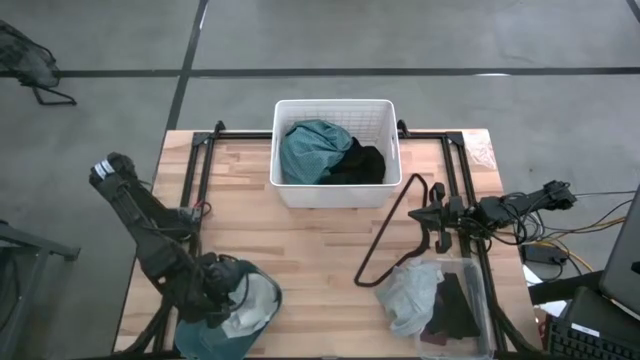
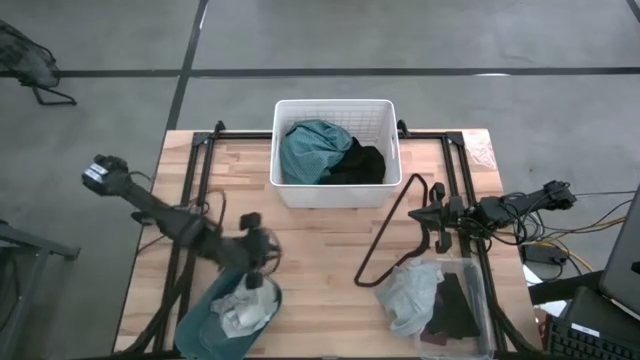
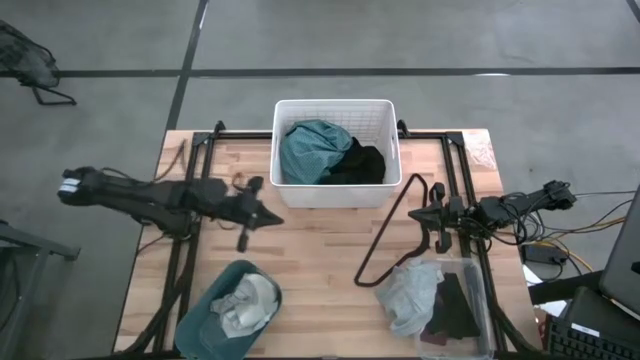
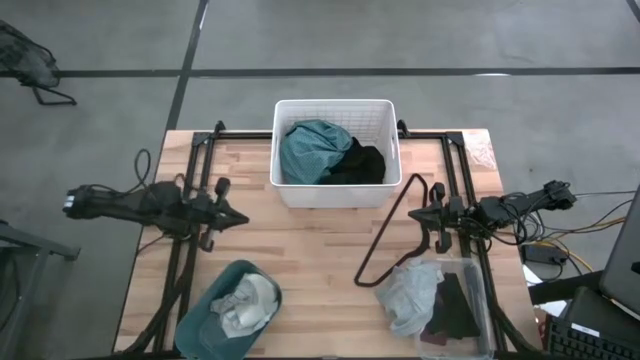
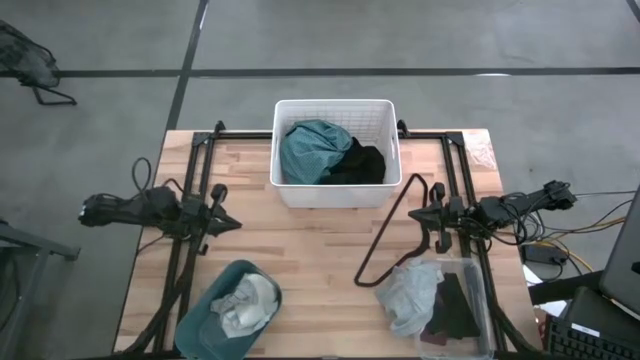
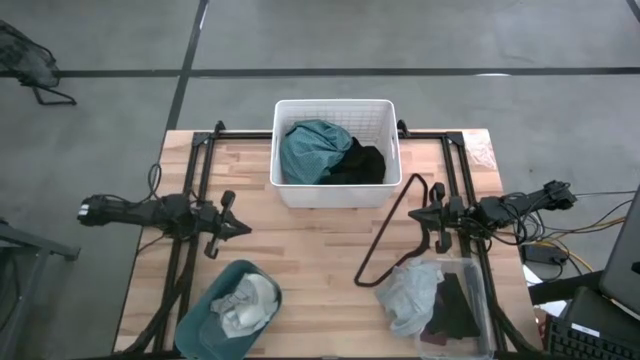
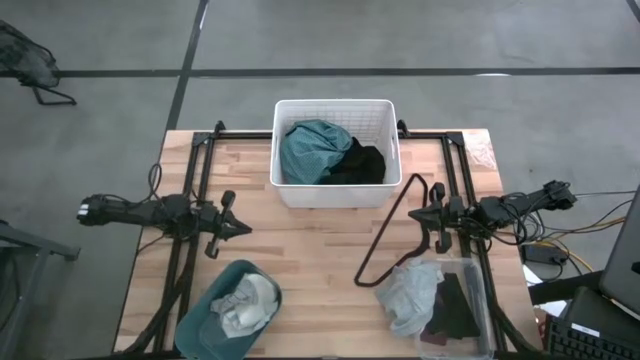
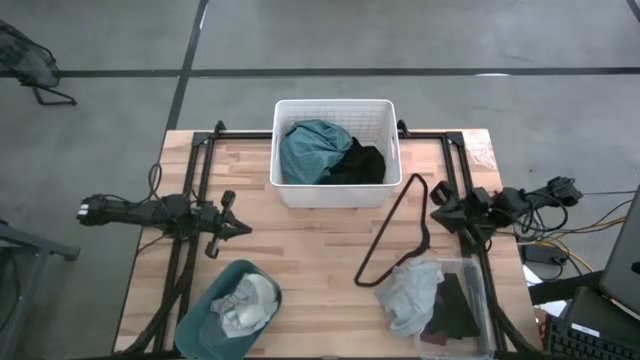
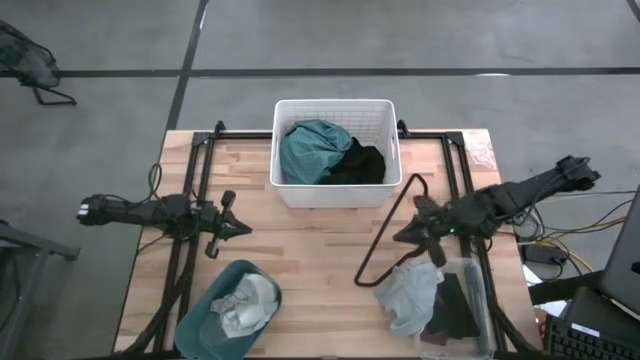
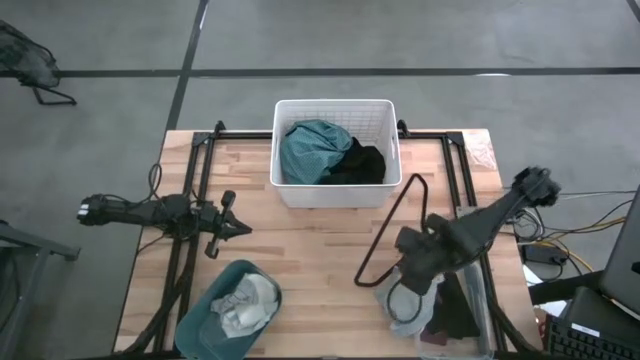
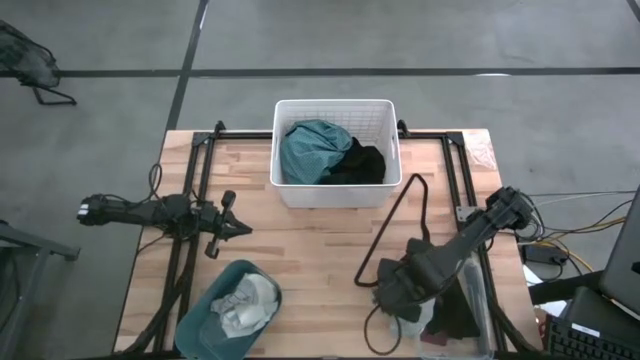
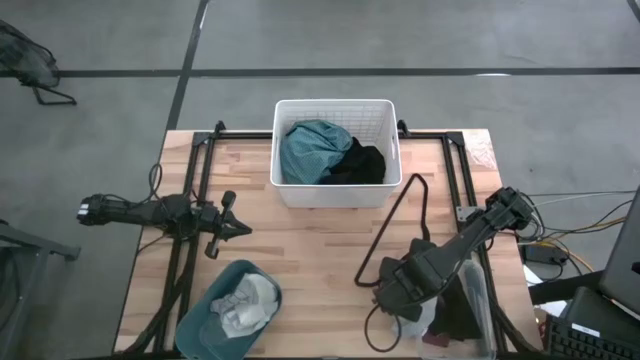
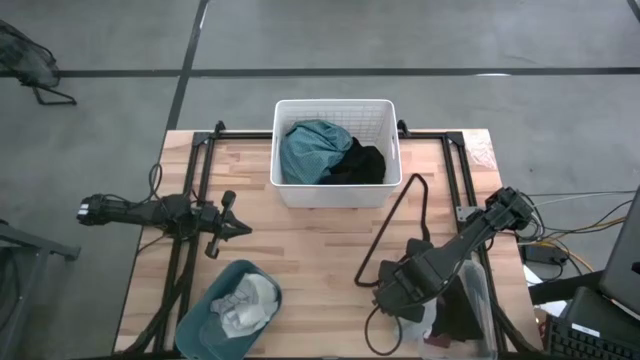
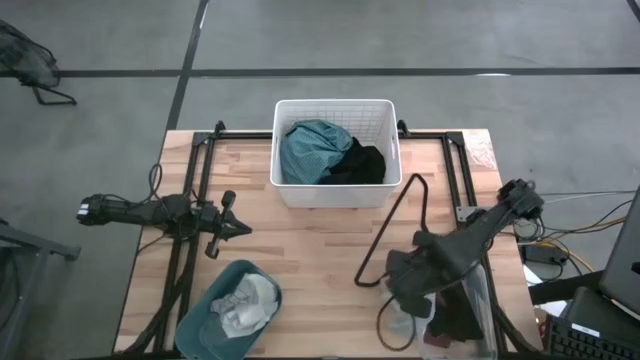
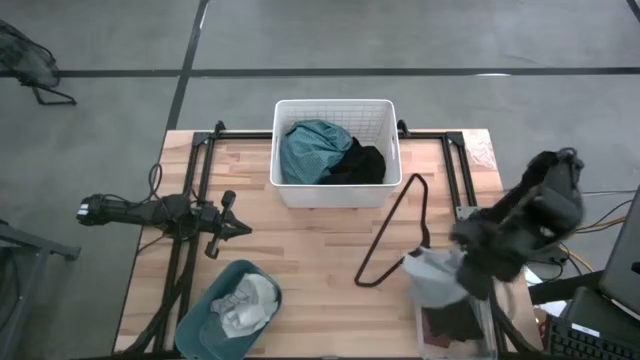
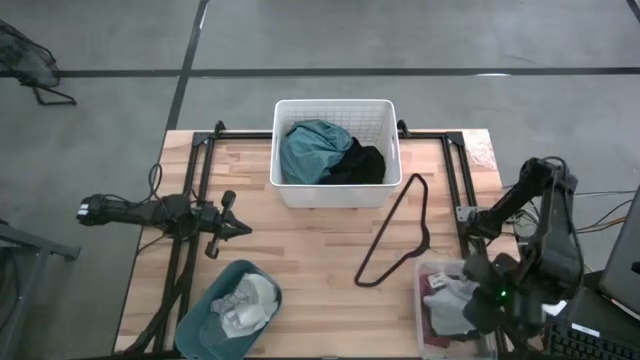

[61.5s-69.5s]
Task: Pick & Place Cloths
Adjust the gray underwear

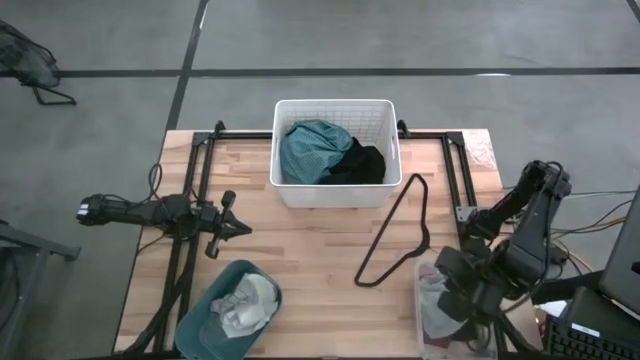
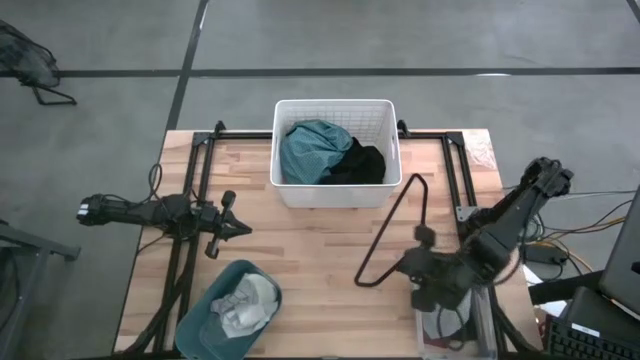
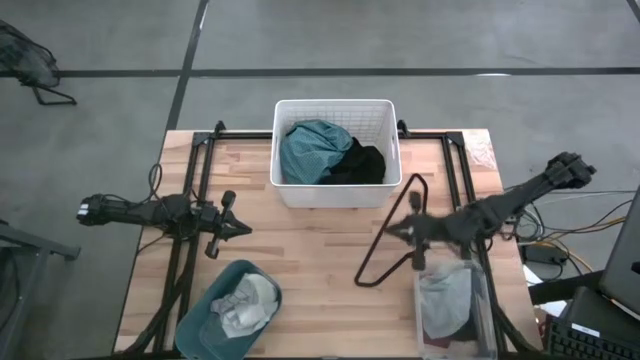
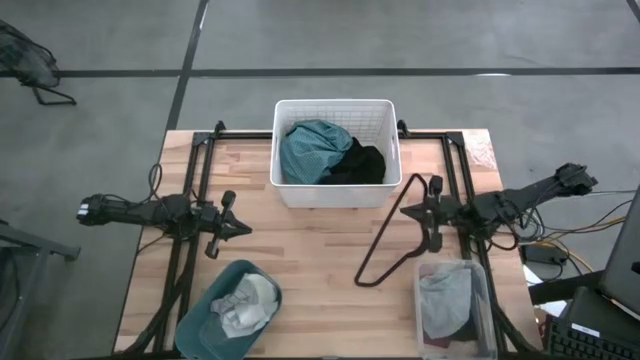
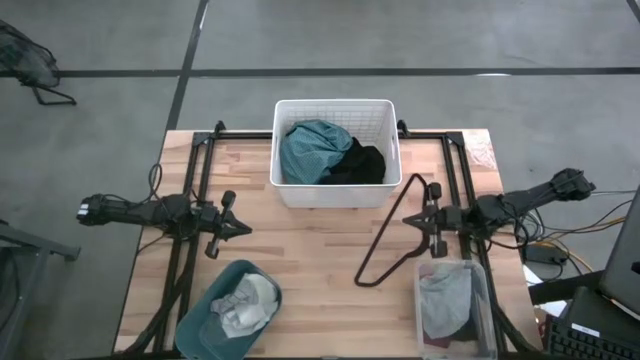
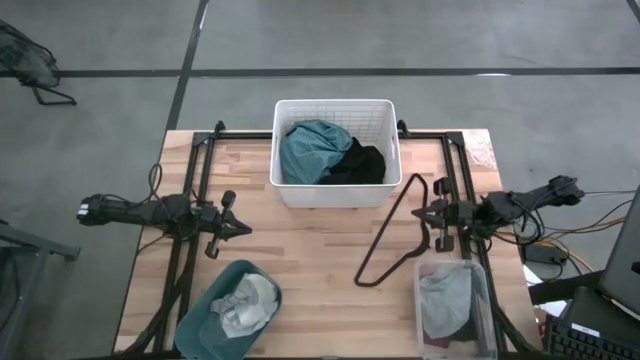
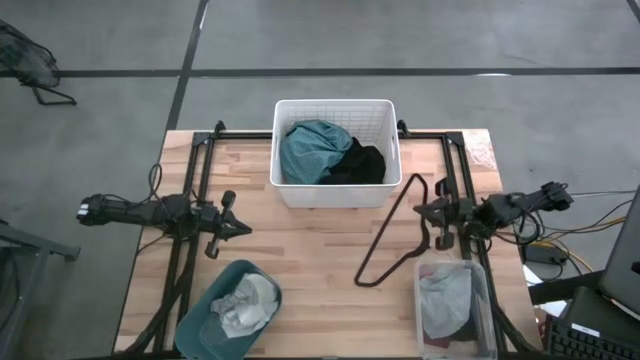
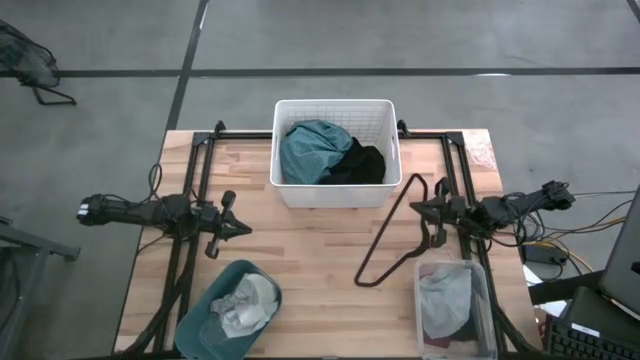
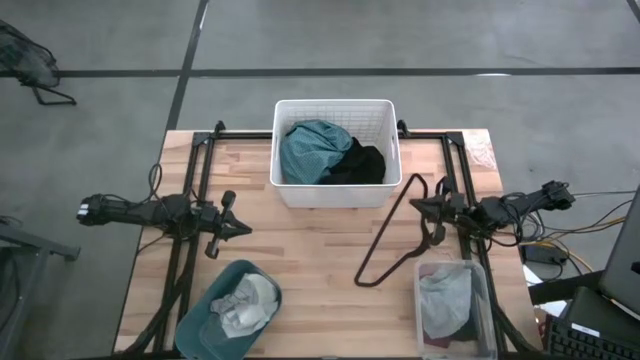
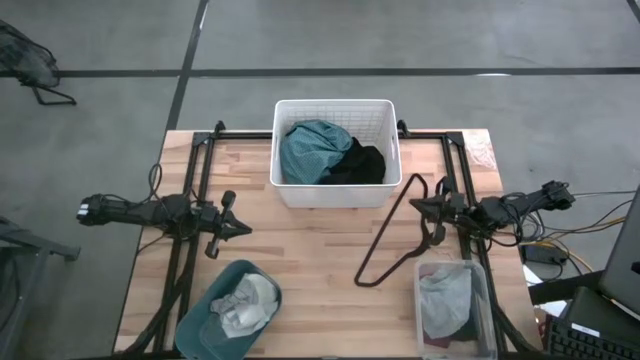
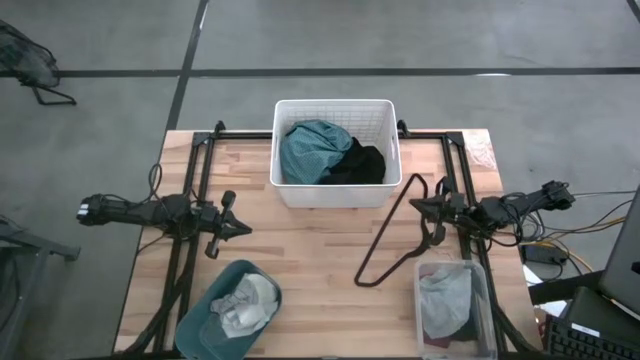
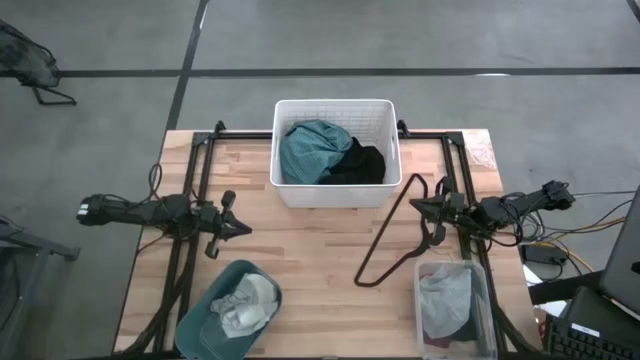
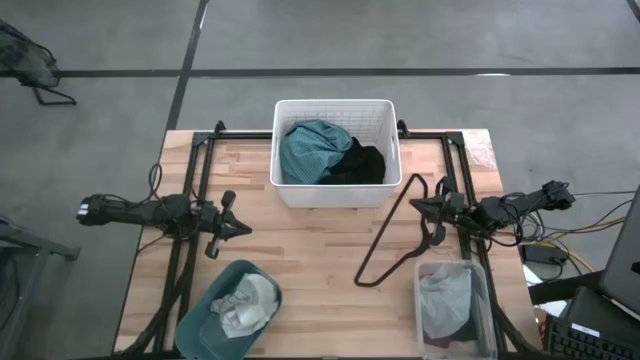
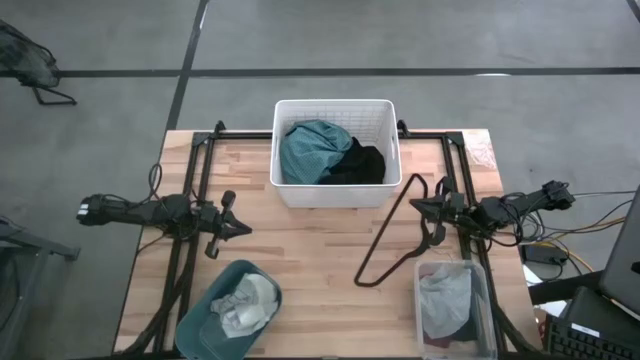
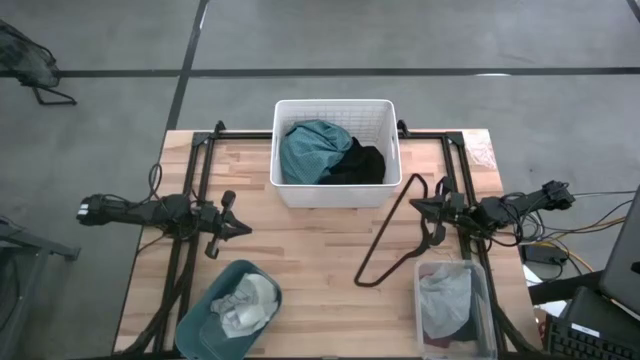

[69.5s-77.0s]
Return to Home Position

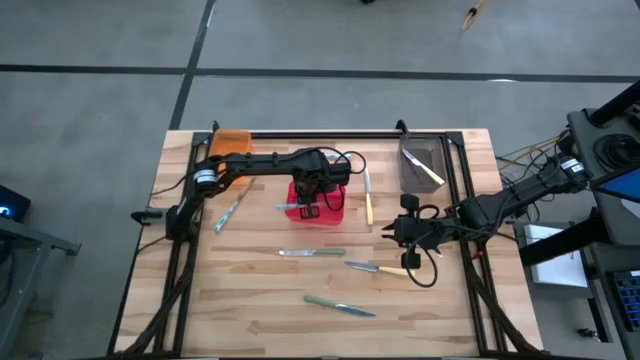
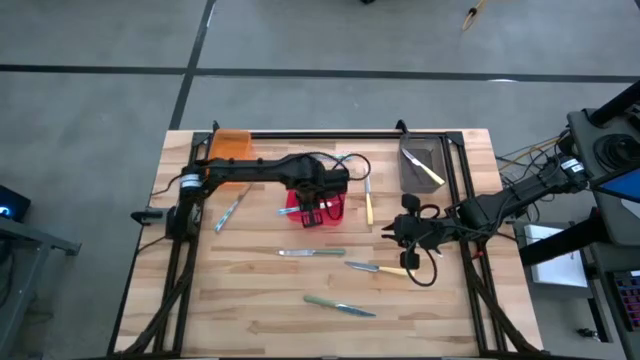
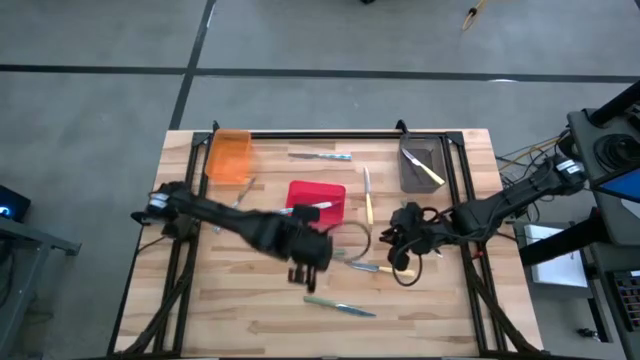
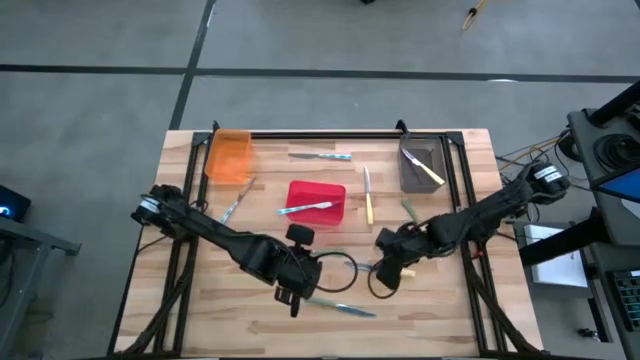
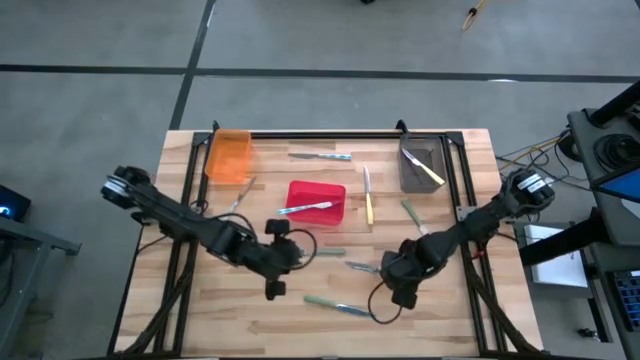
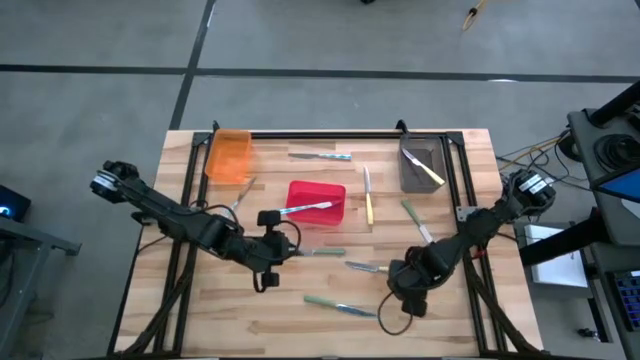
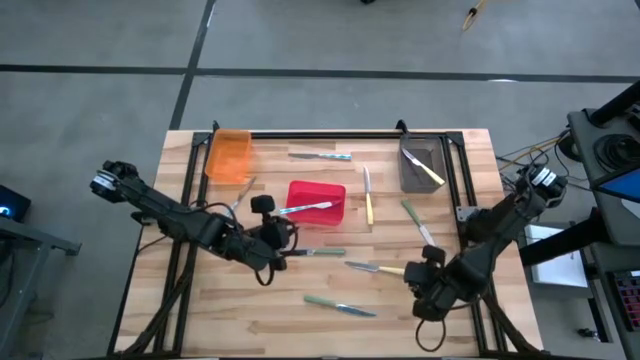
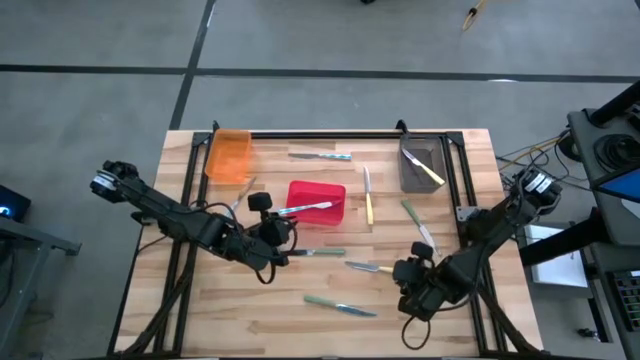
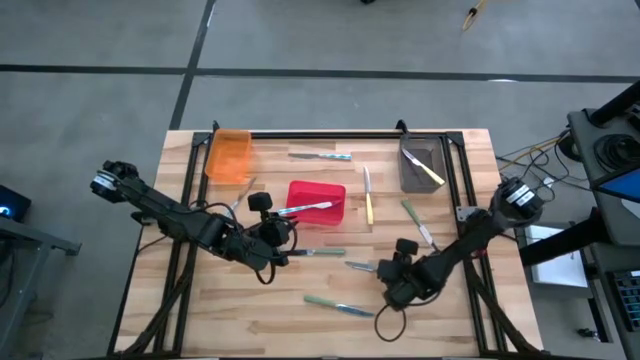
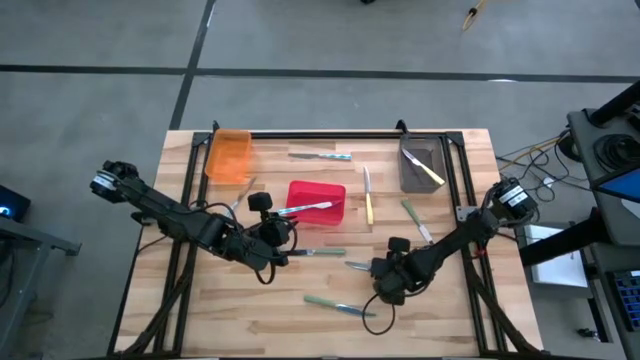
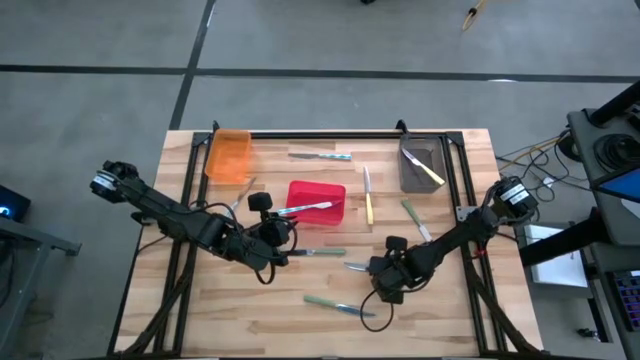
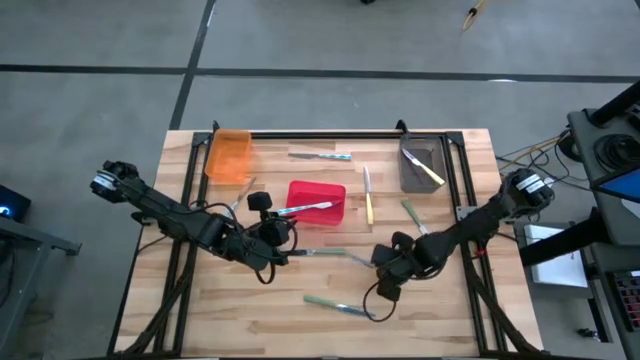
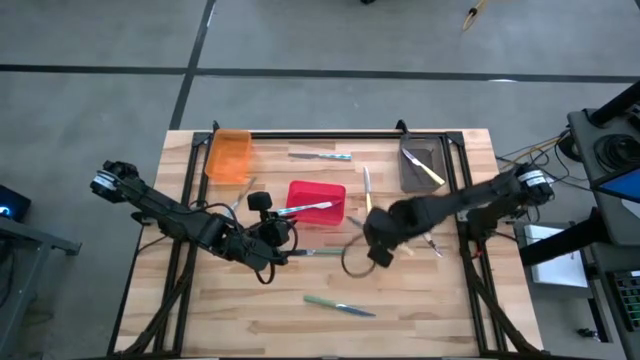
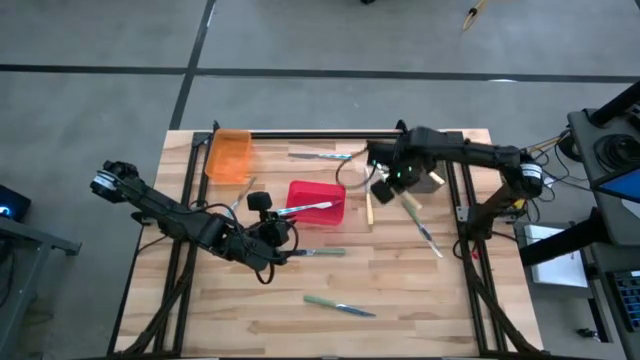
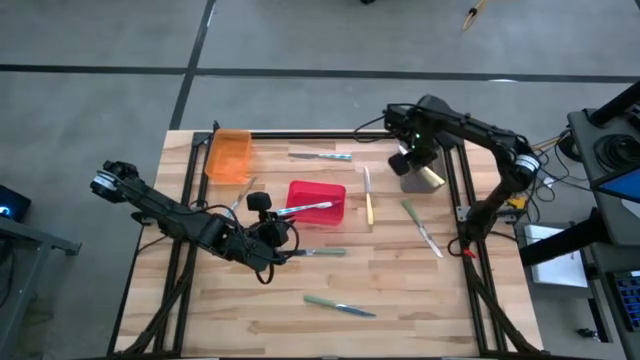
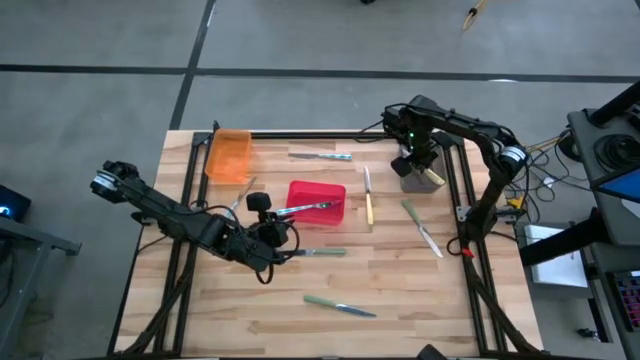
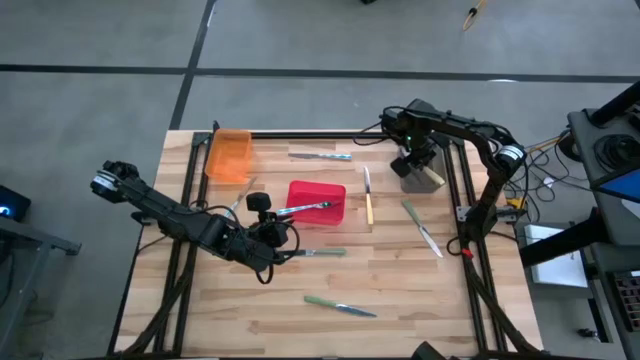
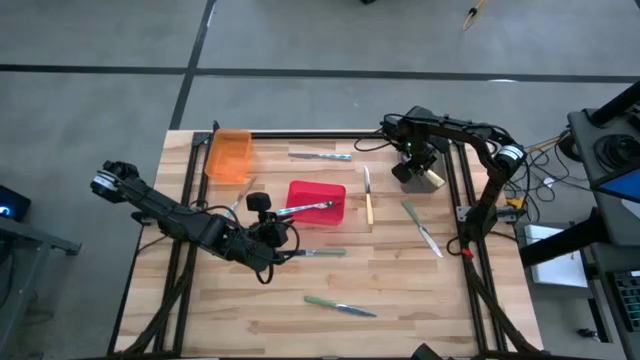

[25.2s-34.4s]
Task: Sort silverware by color (type)
Put the bottom yellow table knife into the black bin
